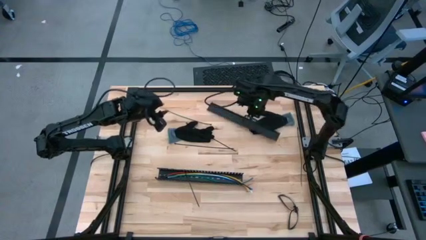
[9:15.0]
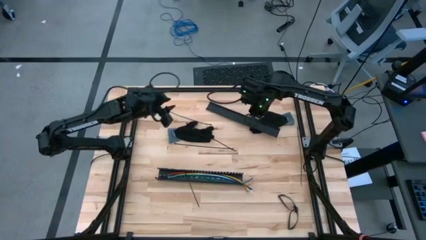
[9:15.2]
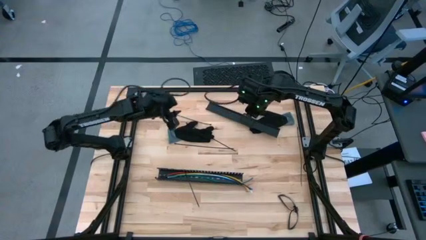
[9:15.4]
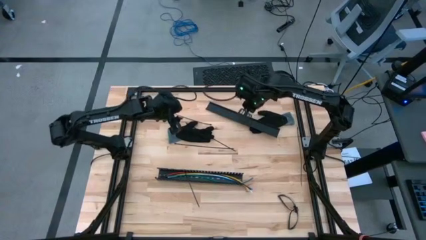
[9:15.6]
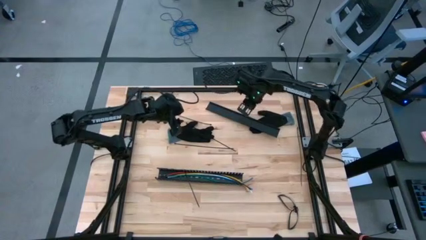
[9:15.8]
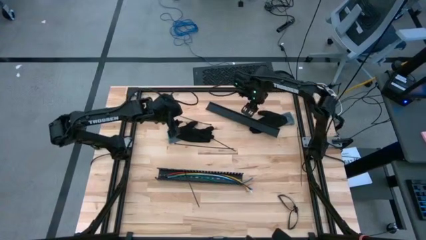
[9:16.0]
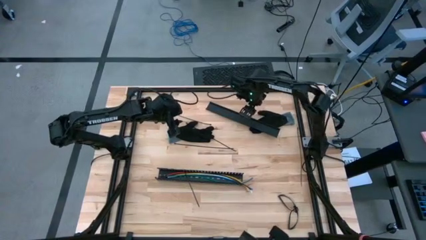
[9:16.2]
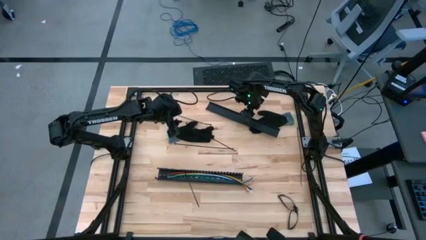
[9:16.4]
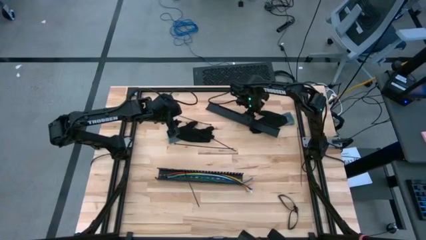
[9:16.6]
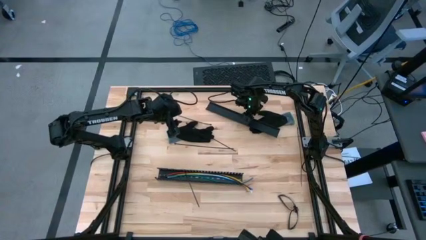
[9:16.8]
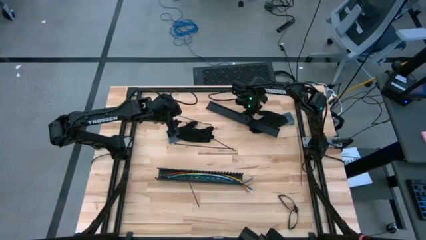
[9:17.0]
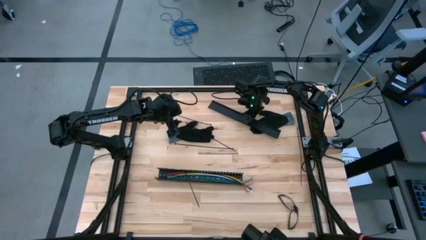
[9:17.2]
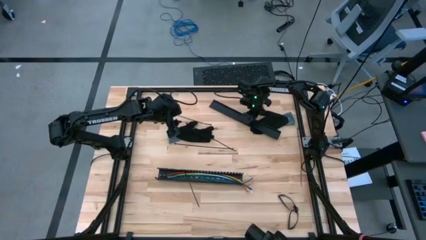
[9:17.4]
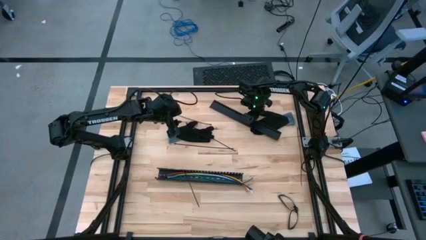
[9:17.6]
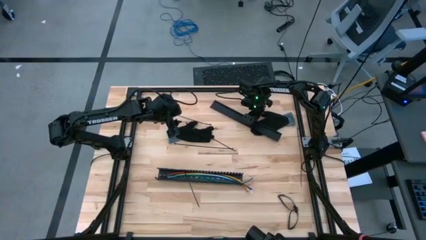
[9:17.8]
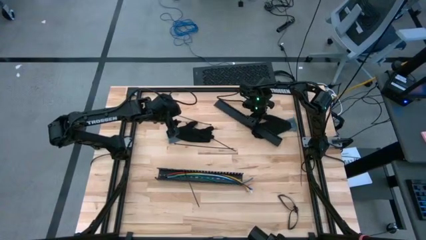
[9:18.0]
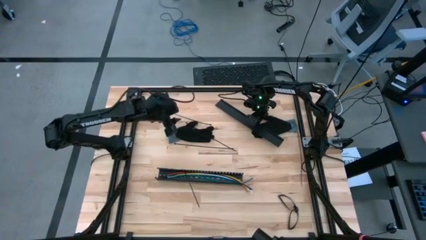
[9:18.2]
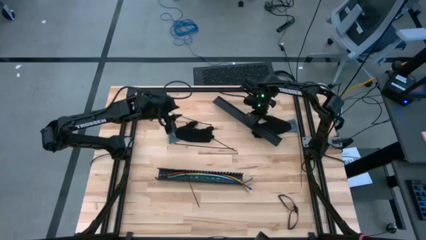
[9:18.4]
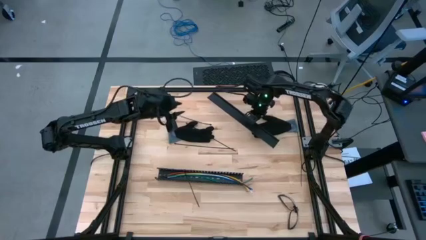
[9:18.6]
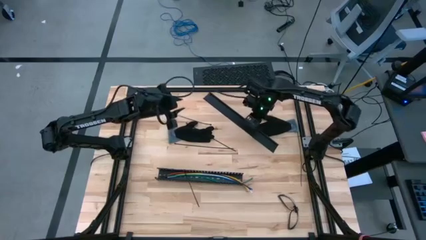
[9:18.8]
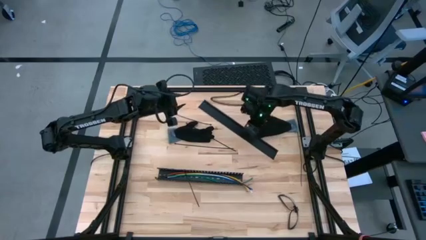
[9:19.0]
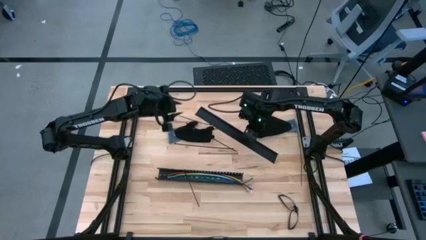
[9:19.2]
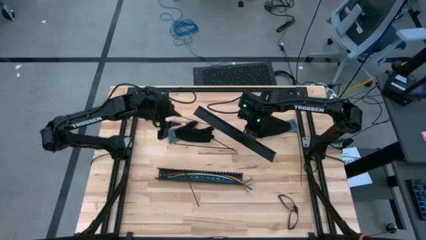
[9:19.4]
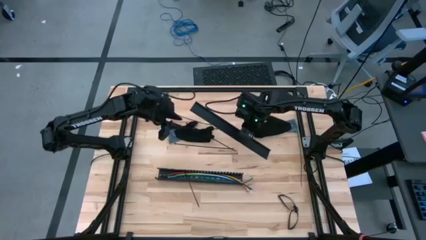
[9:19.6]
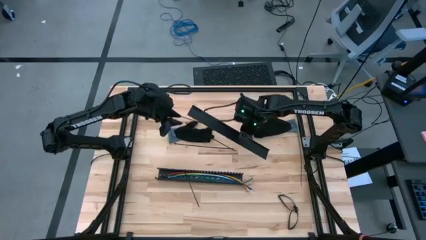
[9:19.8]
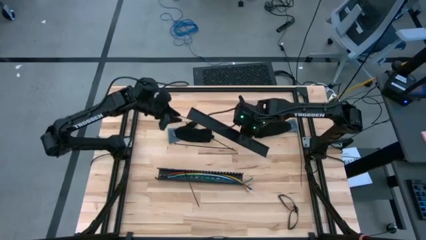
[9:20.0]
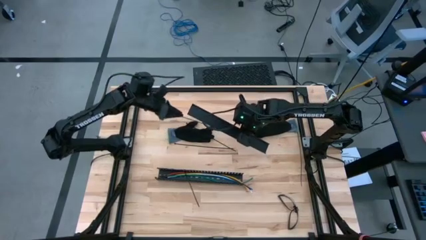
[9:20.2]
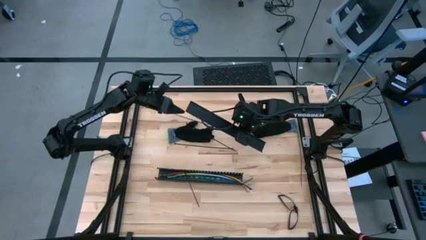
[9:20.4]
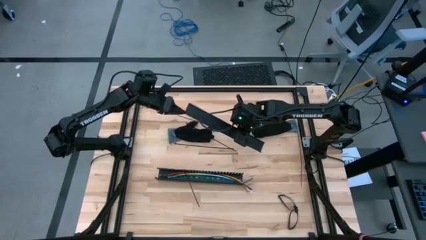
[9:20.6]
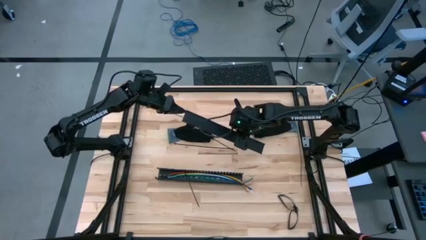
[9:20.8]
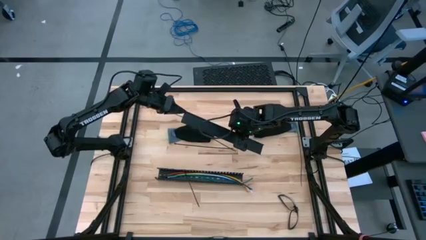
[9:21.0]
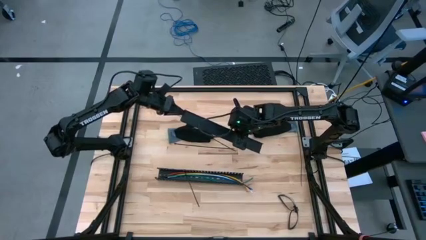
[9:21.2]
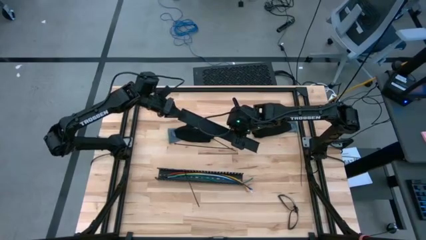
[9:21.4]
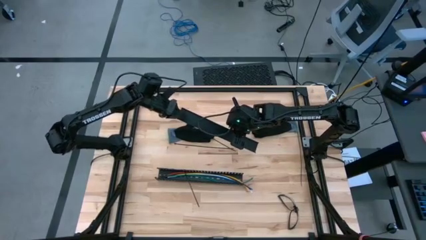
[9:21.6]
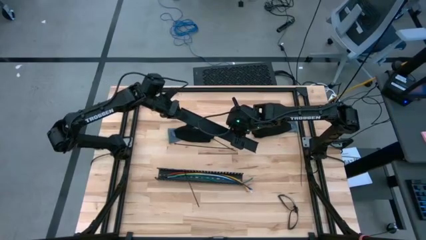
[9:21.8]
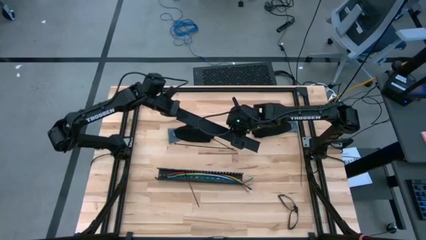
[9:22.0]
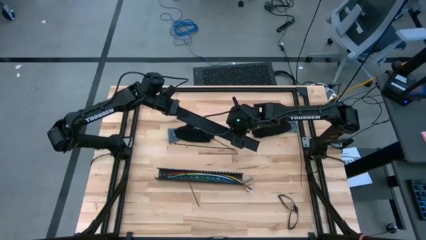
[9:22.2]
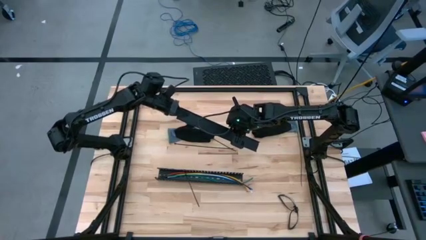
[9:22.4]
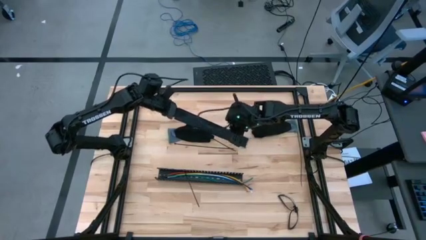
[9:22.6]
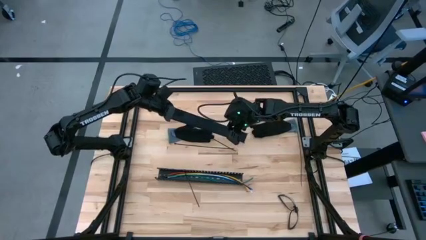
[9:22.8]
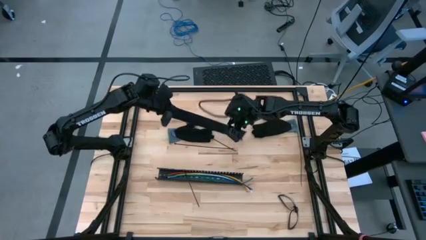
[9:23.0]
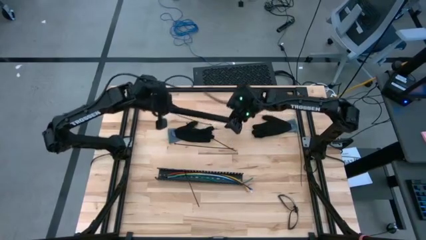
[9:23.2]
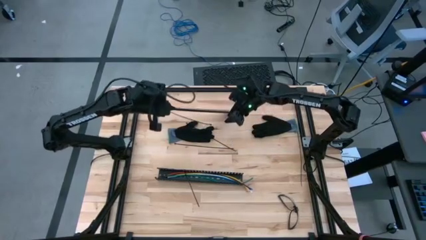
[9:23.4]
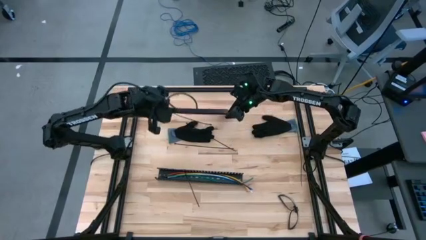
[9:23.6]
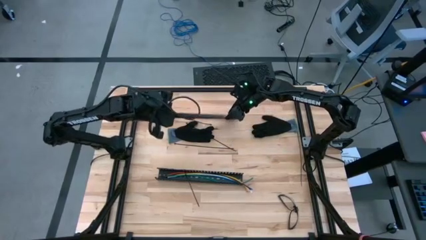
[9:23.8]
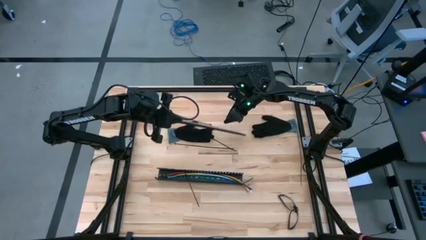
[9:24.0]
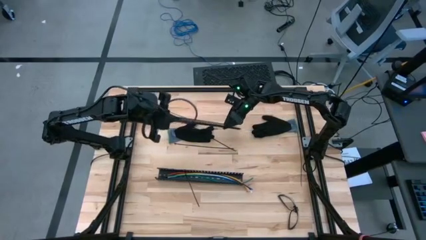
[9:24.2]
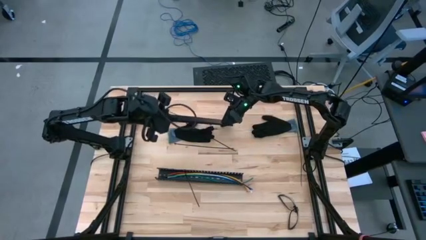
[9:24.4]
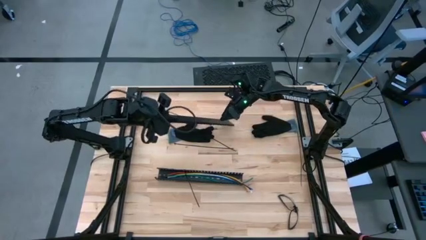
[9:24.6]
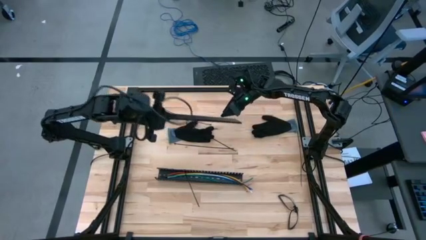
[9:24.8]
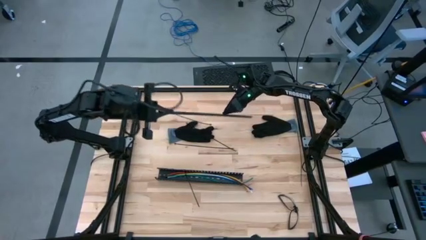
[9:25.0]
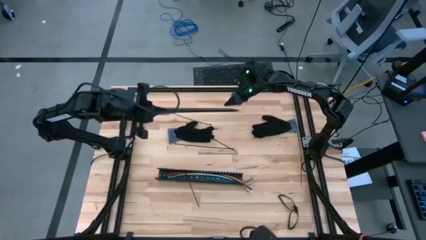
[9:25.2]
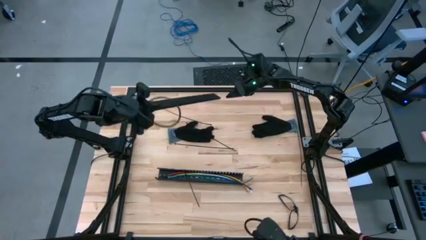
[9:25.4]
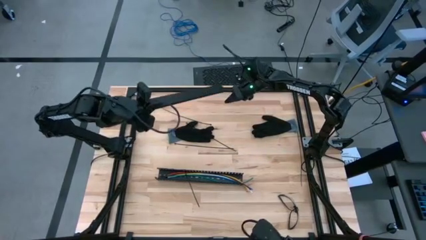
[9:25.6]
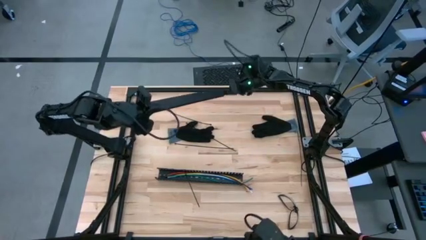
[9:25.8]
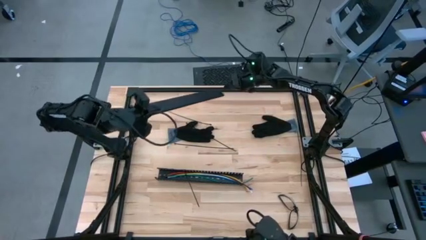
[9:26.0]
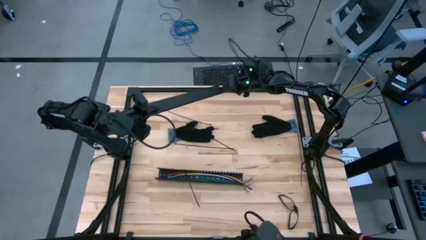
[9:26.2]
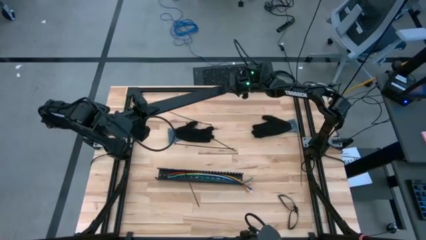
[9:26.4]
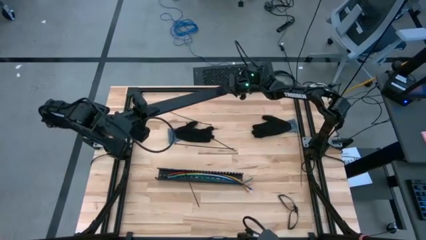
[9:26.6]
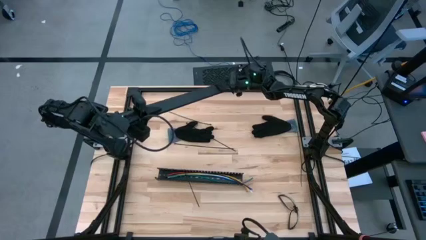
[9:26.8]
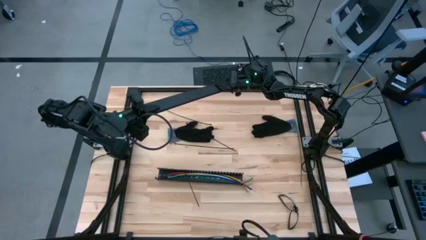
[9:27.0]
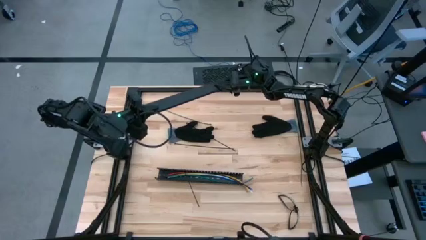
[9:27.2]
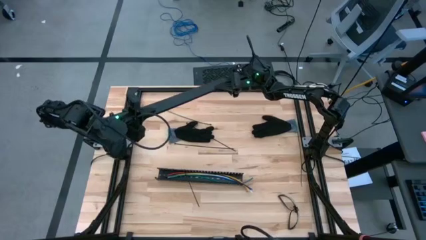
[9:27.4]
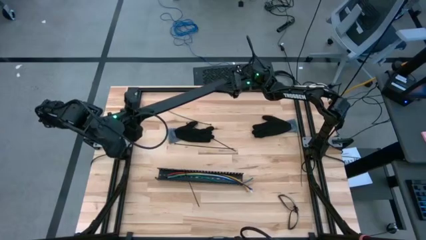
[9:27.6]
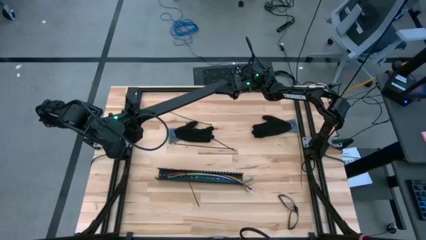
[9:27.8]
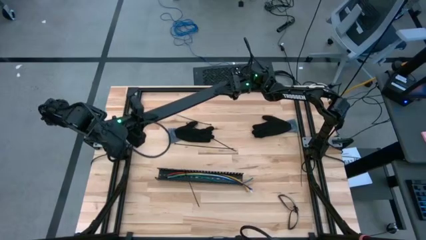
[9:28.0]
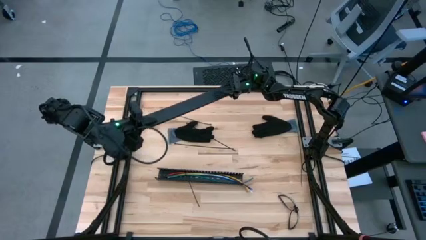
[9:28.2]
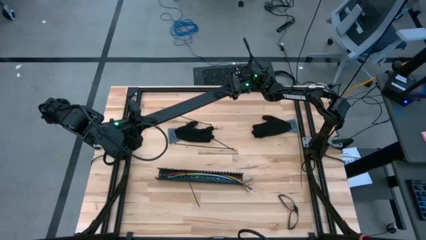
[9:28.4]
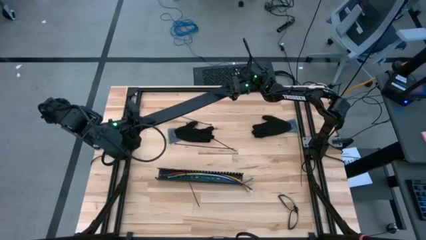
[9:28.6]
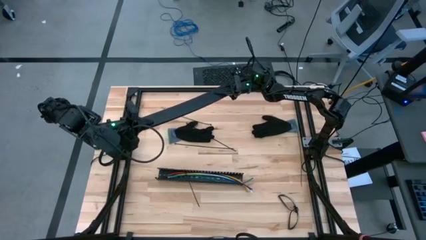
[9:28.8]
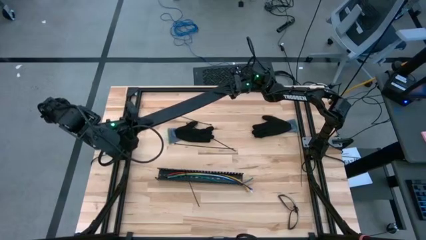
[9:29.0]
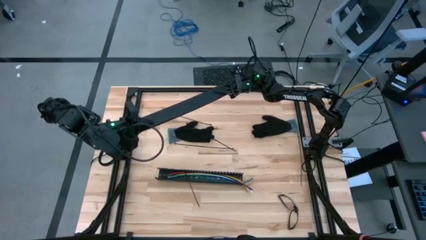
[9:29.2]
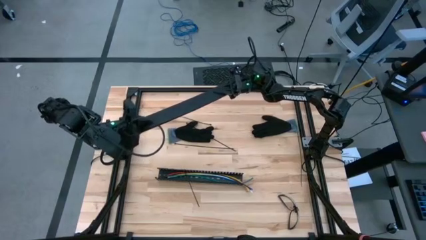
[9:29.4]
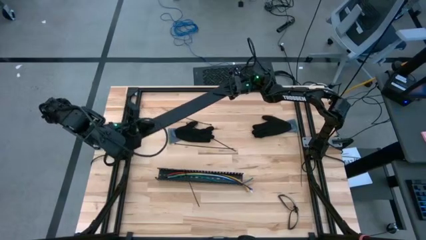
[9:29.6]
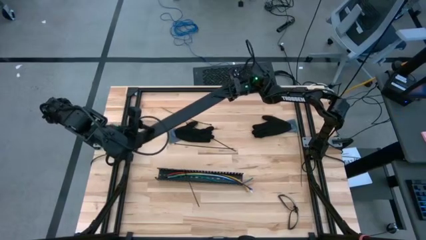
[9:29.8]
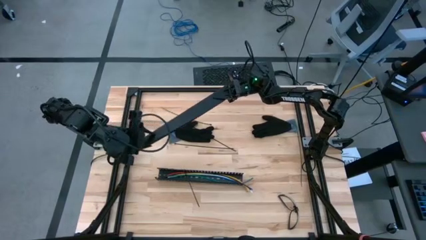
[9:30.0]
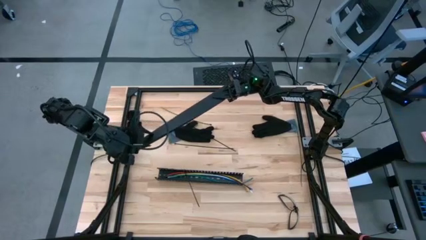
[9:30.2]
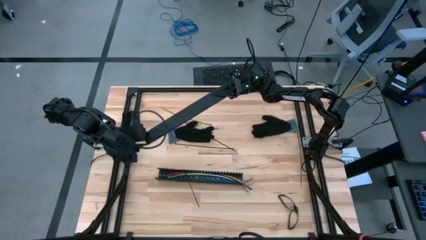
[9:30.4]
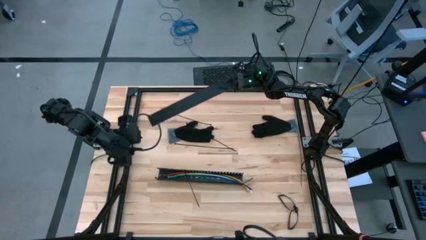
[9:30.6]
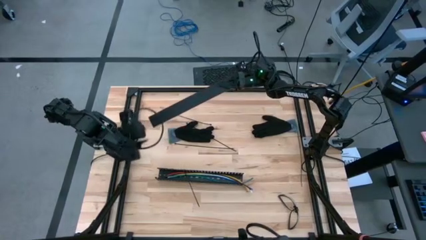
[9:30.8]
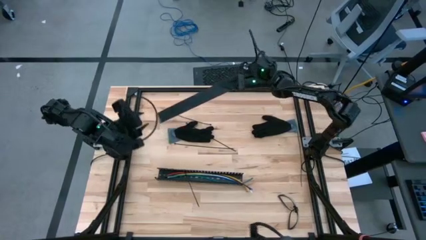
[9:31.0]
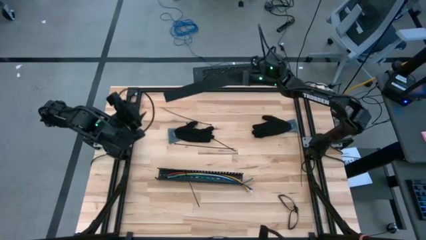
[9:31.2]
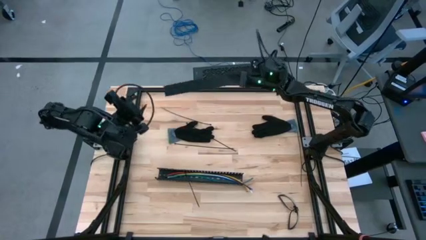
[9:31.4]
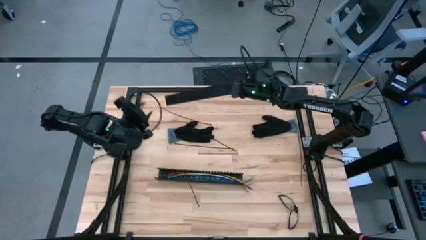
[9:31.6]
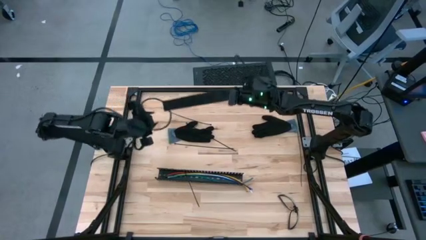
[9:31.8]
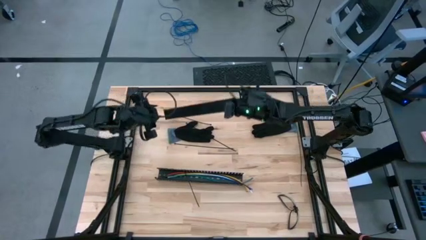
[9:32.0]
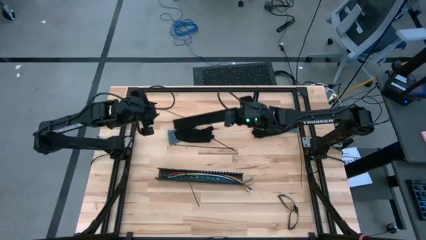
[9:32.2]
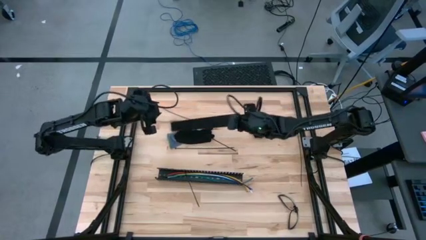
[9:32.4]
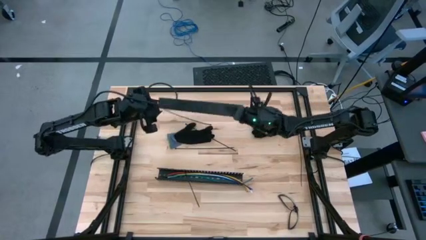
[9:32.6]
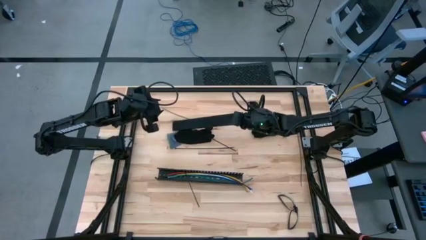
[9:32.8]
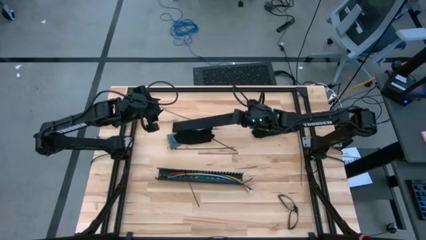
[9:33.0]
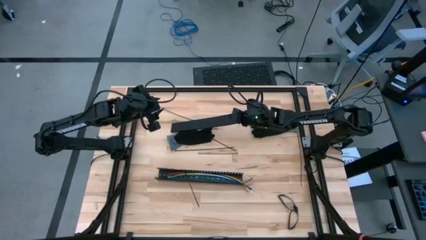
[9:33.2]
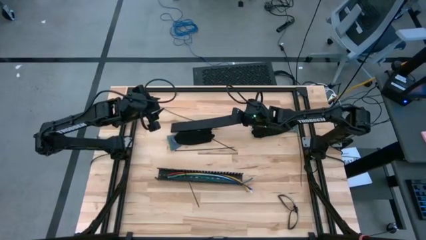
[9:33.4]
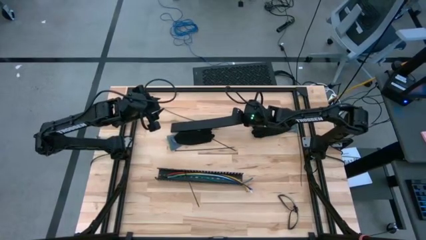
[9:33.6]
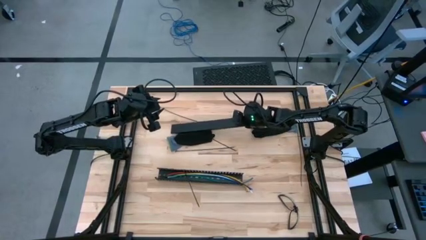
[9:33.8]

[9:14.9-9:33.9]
Task: Ziptie cables
Close the cable duct
